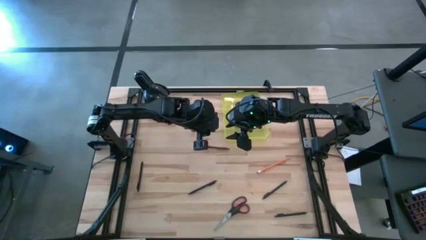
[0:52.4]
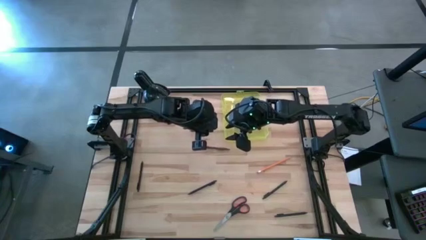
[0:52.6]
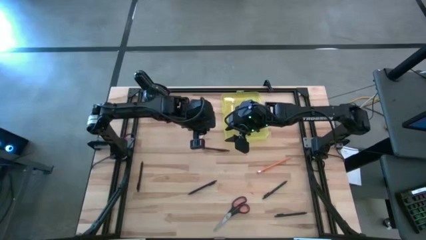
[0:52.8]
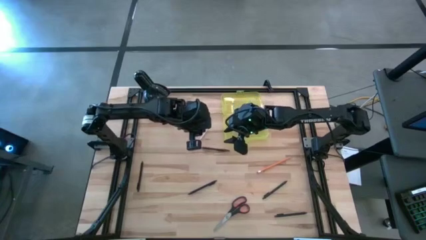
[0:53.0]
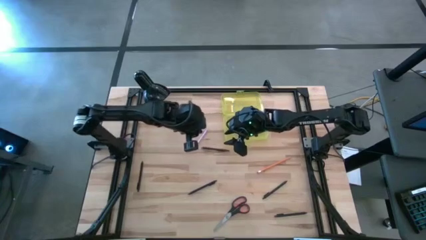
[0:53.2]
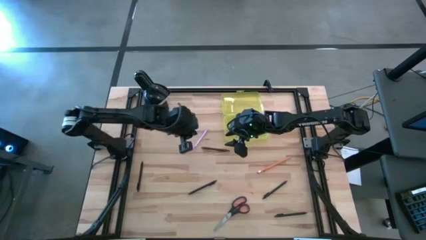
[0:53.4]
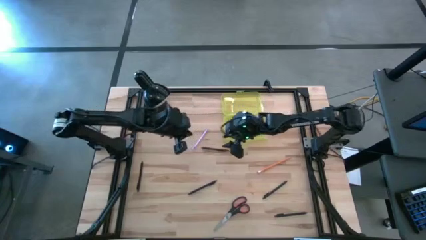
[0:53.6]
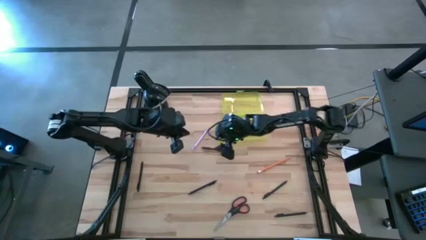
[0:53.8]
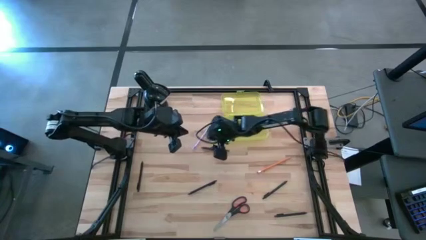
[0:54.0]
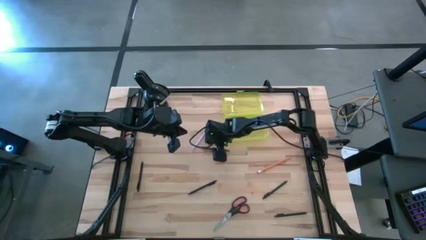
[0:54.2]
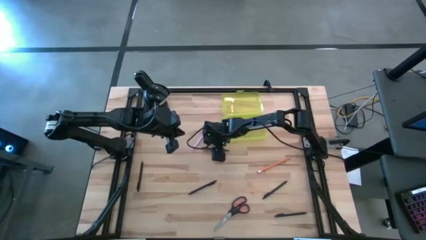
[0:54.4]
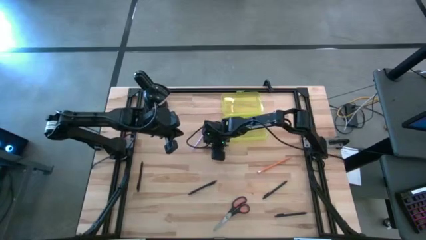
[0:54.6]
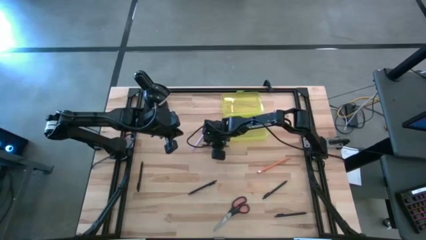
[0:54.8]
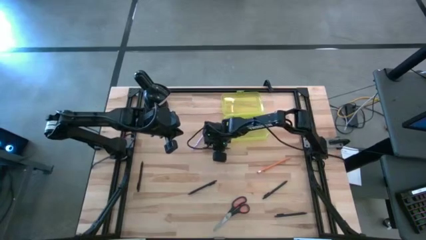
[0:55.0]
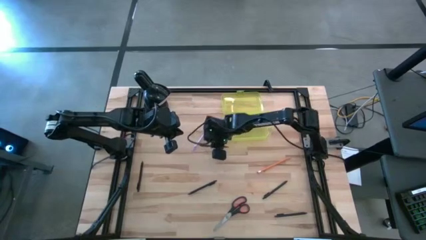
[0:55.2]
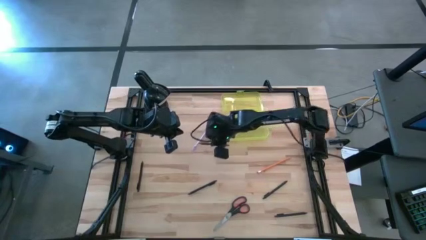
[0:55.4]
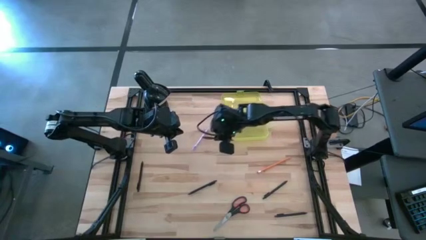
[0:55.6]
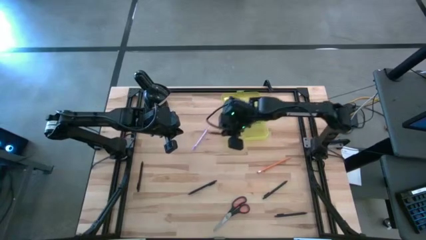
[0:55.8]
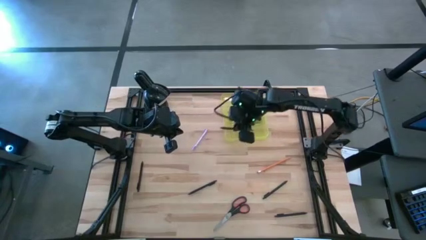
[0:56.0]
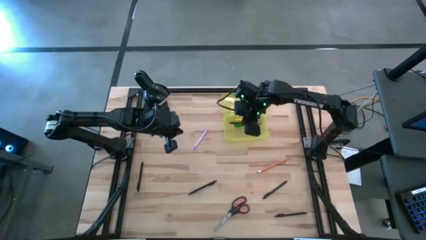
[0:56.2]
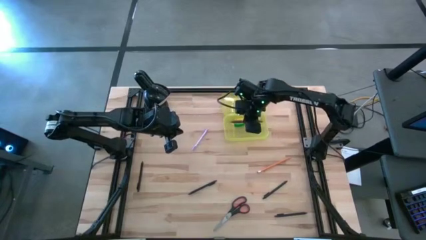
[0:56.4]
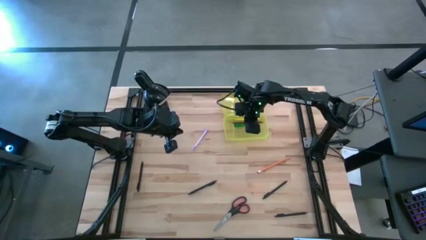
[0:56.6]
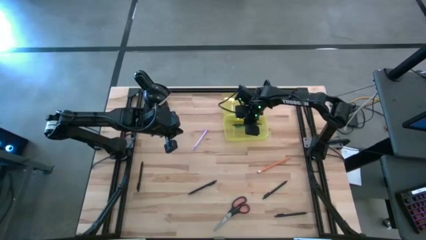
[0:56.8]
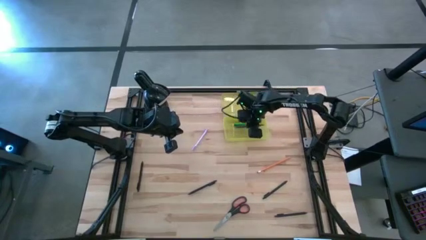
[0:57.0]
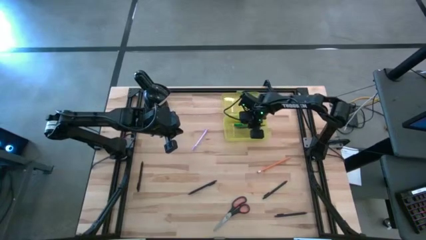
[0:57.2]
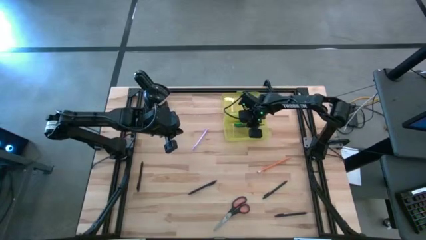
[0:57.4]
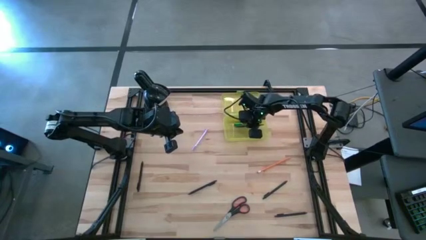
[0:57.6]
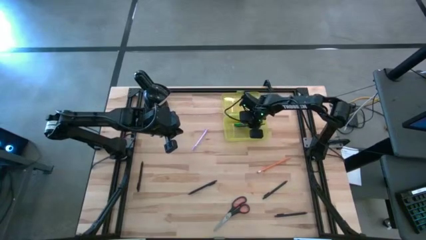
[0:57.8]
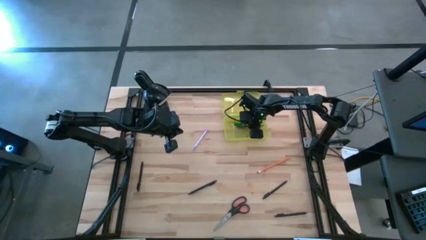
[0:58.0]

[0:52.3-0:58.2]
Task: Pick & place school supplies into a supply box
Put the brown pen into the supply box

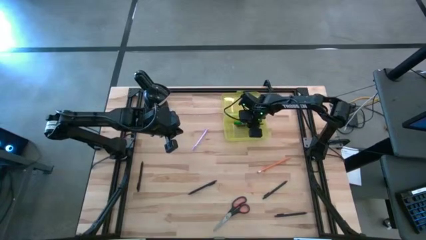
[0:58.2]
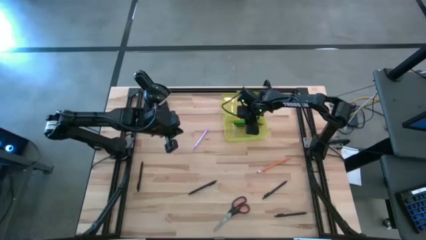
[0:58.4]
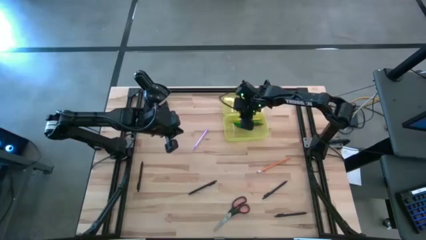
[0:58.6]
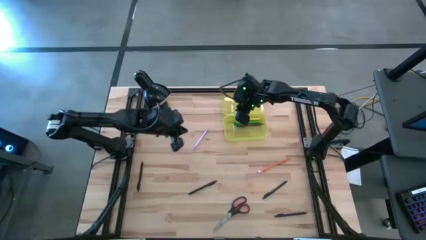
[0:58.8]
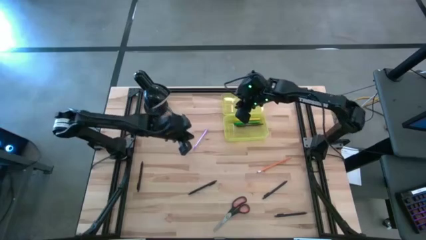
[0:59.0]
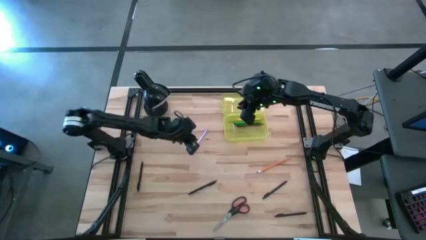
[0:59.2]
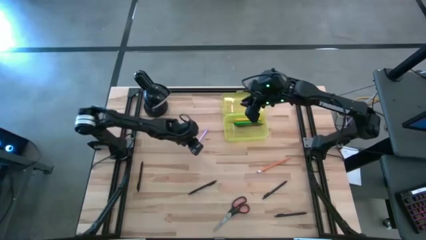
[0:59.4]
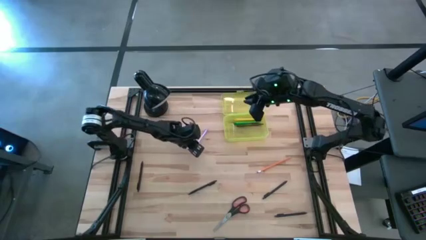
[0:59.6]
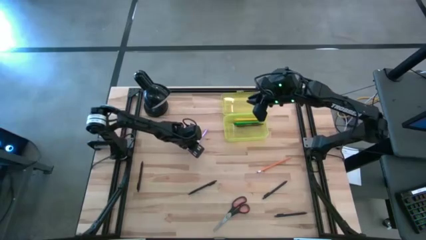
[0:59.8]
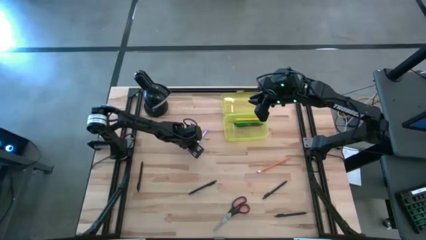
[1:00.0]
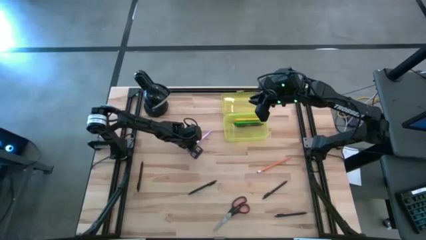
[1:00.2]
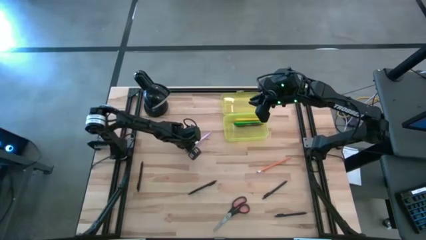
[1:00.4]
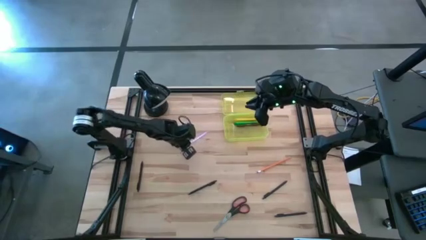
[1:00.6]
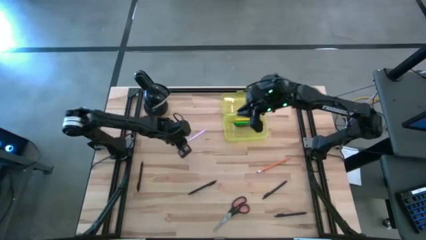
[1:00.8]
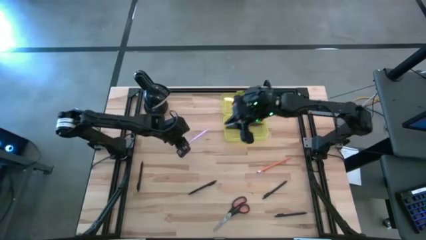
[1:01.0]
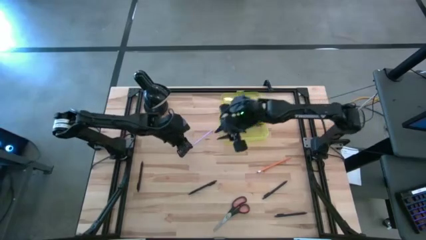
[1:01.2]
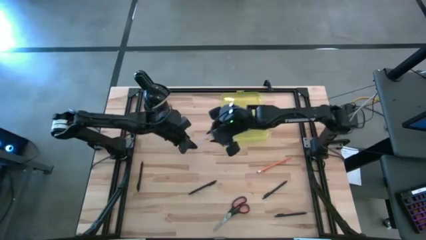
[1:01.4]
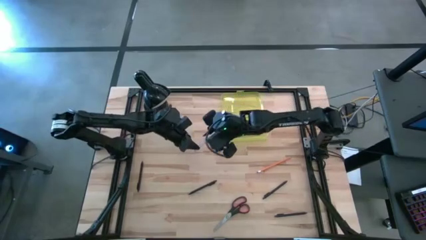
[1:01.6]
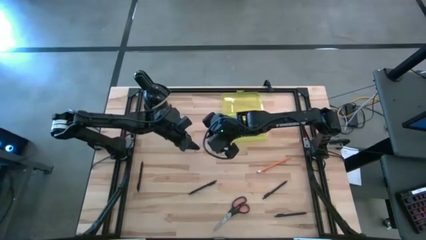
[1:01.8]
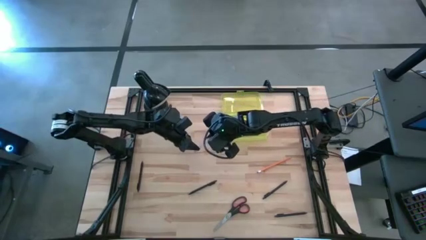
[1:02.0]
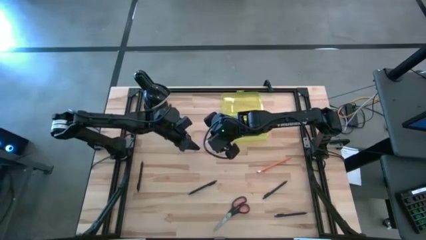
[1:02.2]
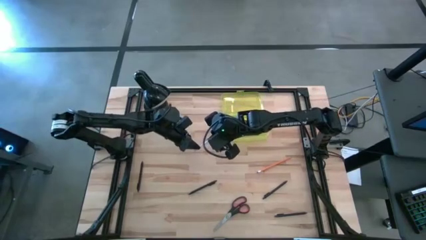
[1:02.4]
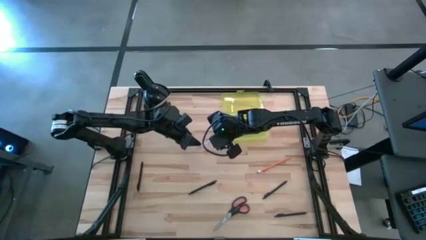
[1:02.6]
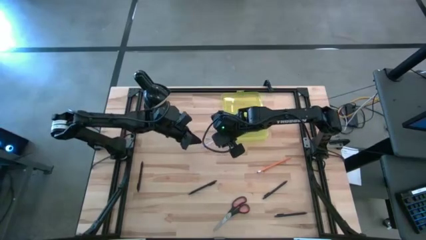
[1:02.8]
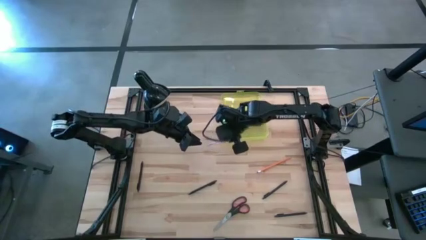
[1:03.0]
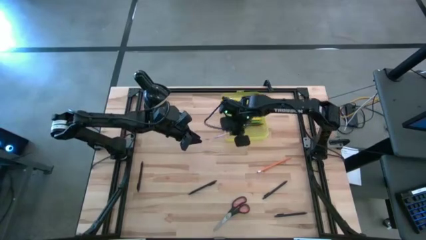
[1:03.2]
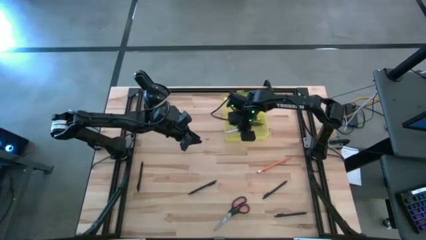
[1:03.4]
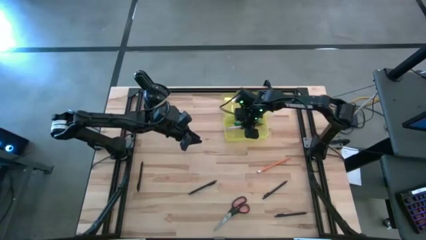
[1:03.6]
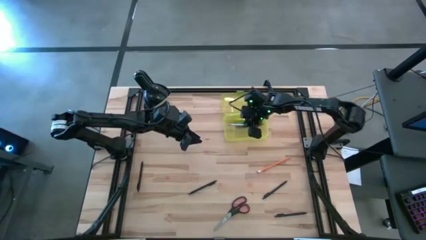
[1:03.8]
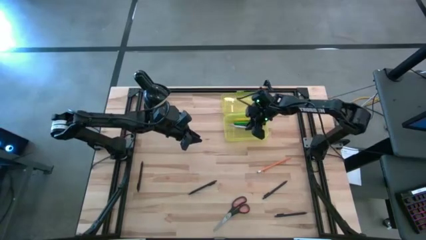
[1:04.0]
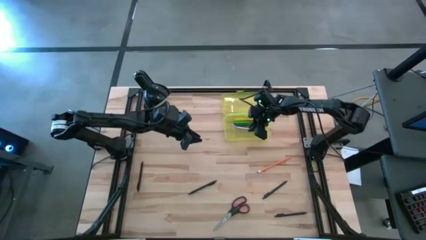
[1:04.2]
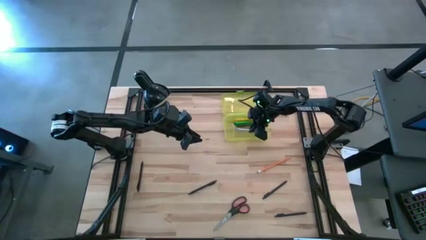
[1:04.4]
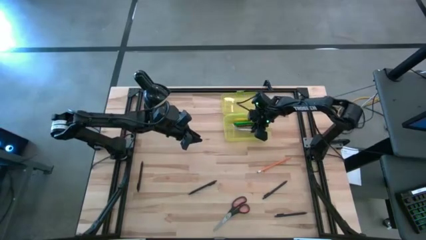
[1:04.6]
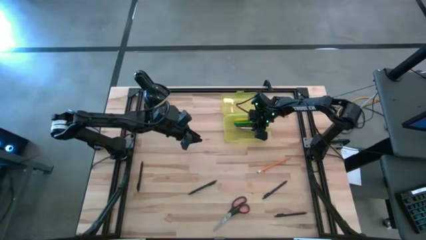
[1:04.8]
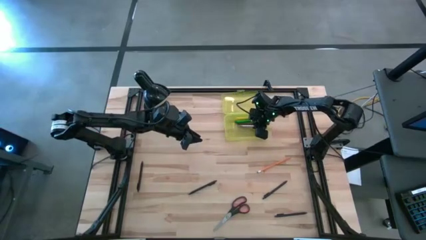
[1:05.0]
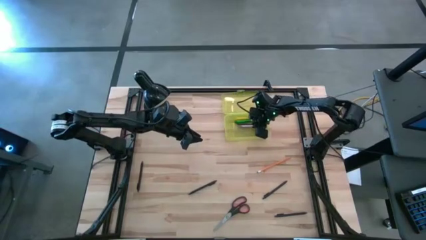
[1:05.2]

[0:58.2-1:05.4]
Put the purple pen into the supply box

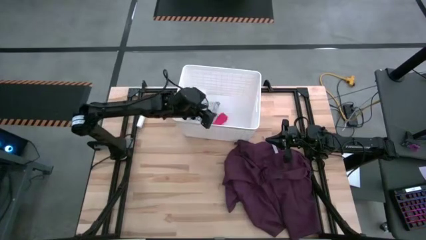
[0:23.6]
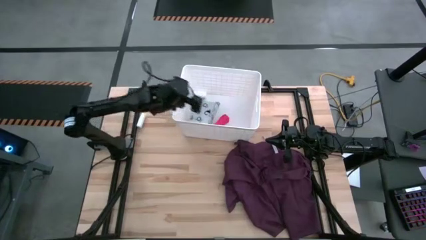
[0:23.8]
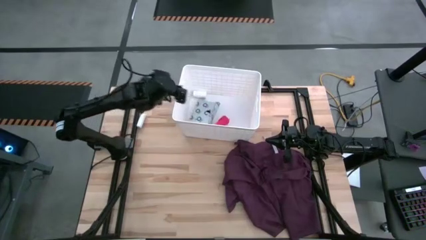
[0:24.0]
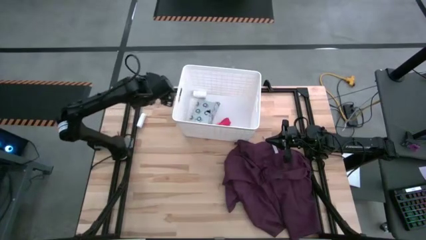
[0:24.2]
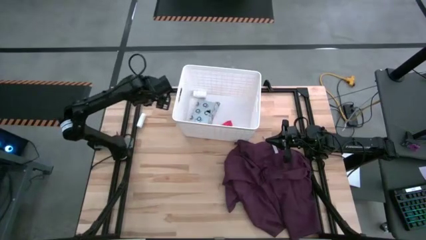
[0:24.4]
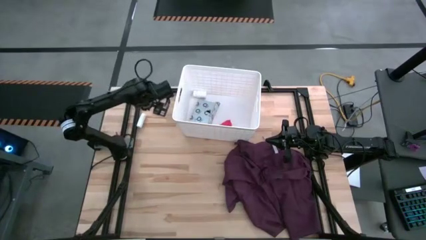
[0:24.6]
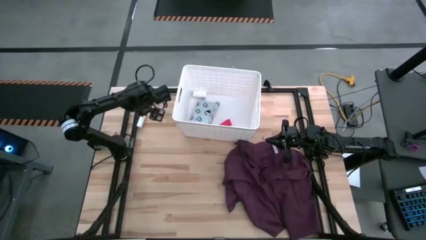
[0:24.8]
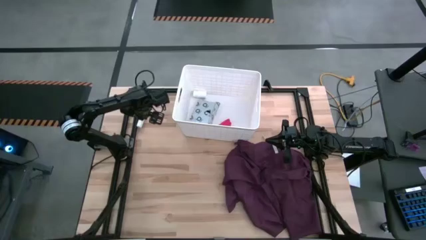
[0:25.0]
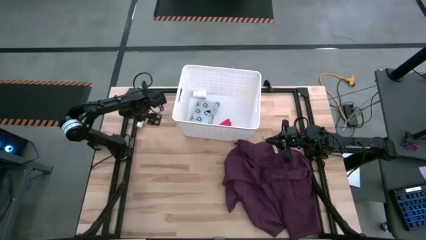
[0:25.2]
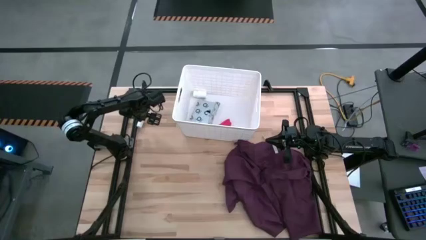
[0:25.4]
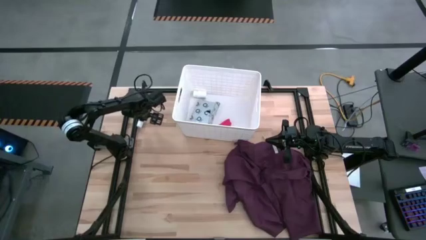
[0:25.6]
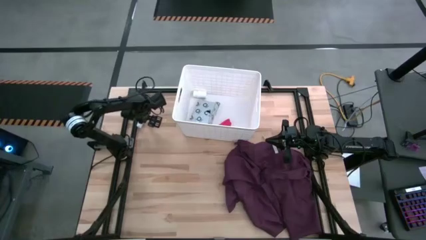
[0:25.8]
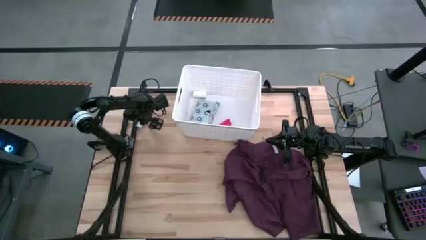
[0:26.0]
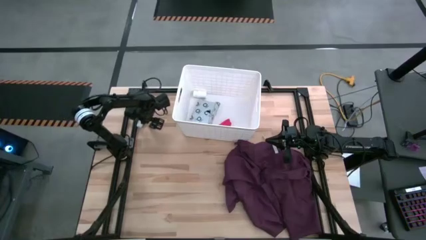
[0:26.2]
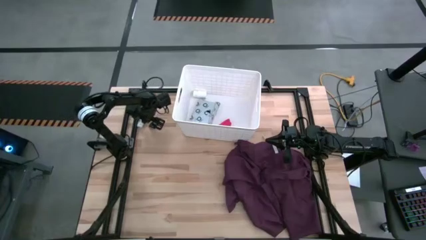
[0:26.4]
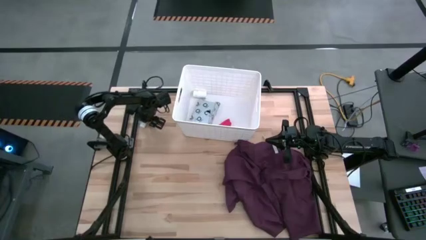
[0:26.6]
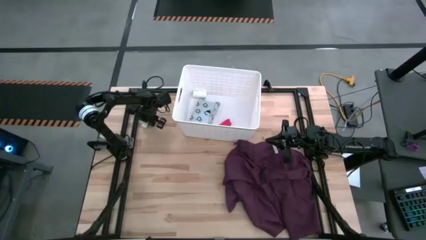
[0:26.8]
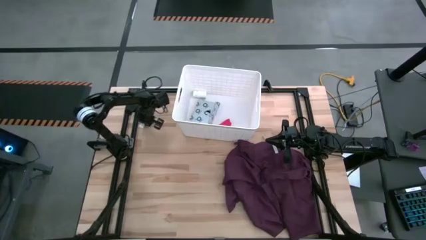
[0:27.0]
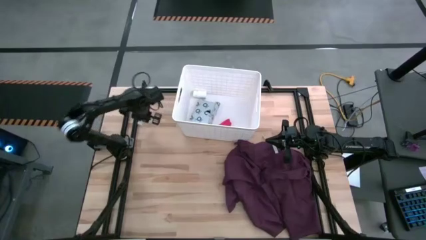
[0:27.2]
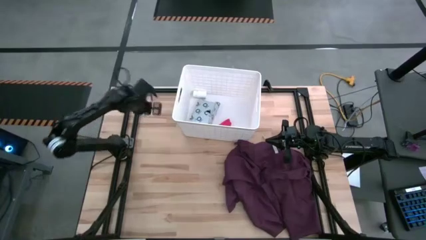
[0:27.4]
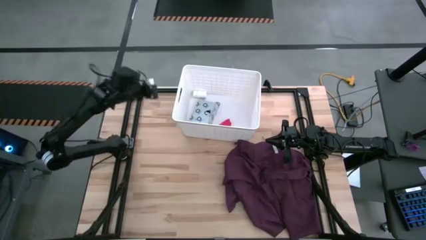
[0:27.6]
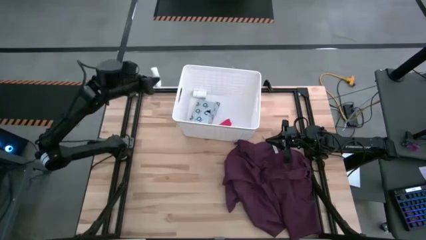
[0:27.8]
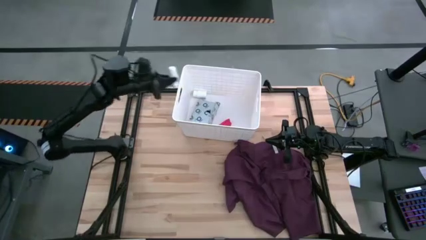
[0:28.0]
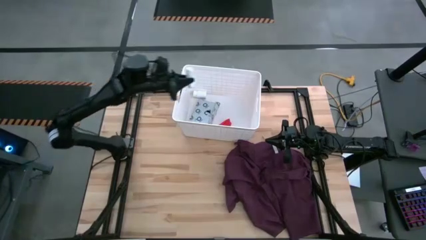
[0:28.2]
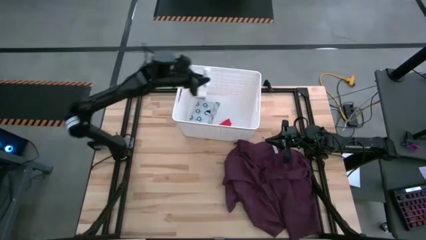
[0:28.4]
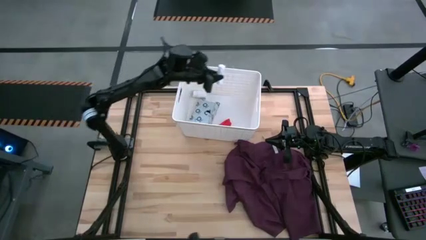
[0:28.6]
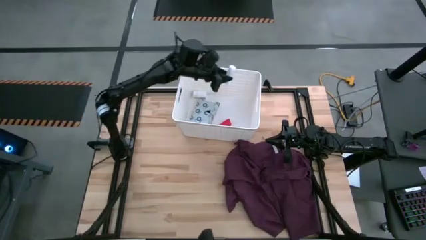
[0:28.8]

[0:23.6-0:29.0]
Task: Pick & place medical supplies in basket/bin
Put the roller gauze into the white bin
